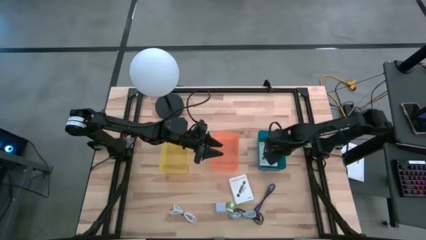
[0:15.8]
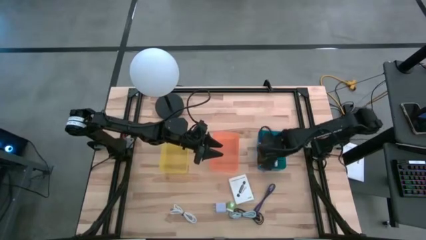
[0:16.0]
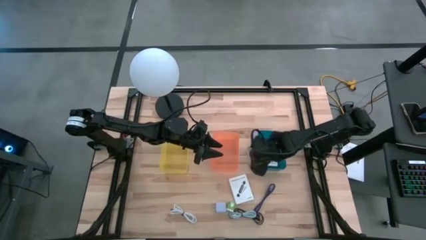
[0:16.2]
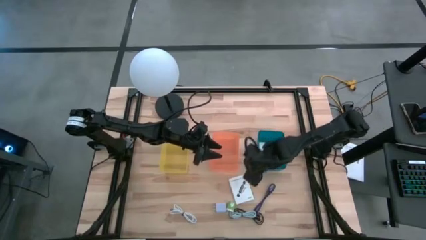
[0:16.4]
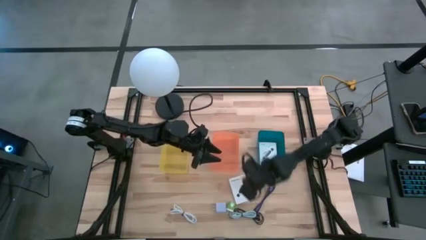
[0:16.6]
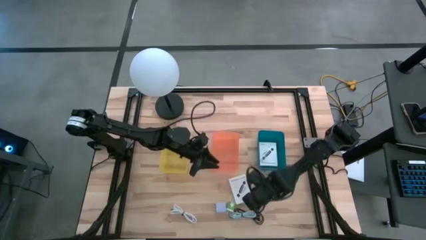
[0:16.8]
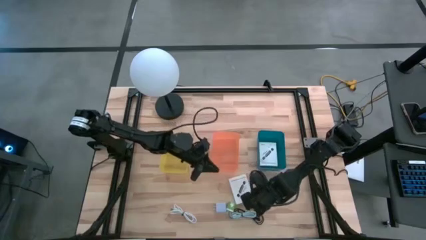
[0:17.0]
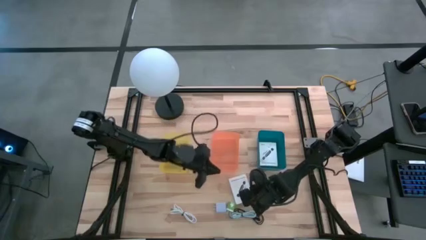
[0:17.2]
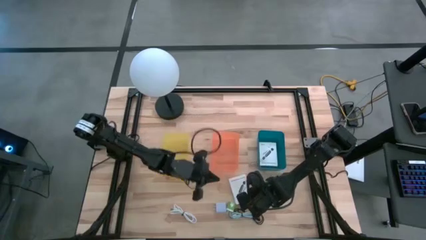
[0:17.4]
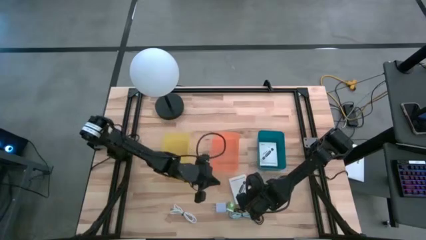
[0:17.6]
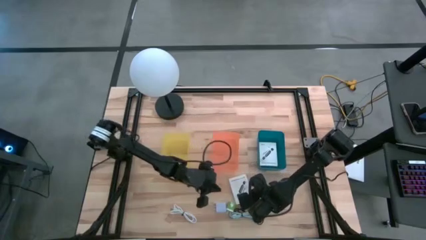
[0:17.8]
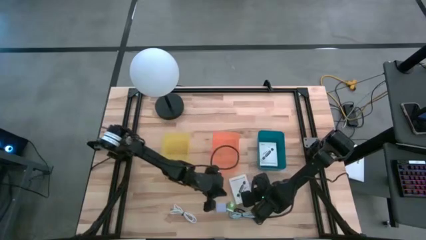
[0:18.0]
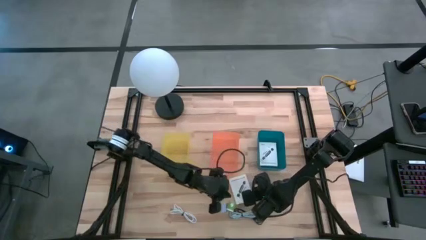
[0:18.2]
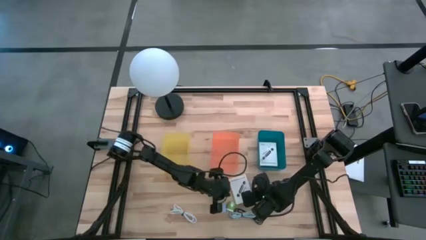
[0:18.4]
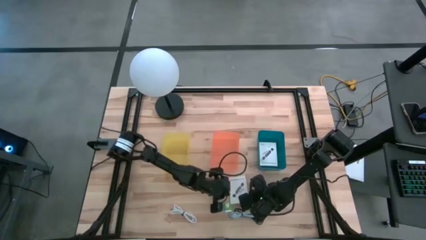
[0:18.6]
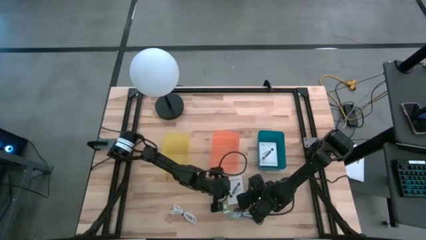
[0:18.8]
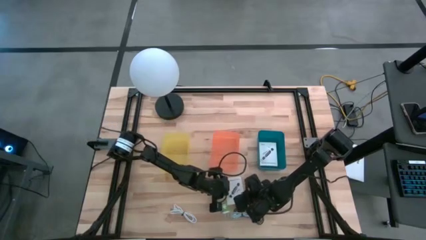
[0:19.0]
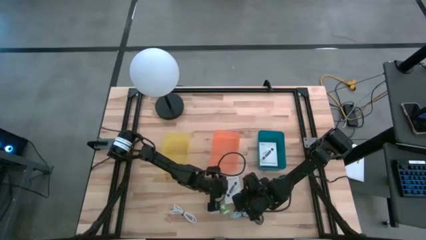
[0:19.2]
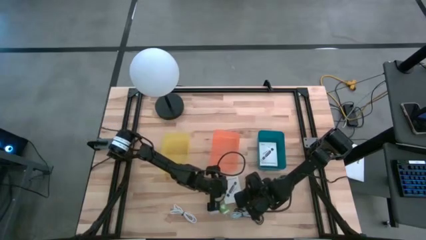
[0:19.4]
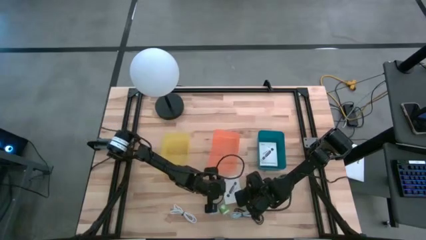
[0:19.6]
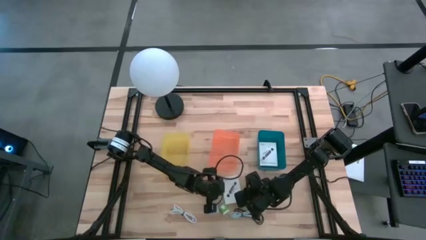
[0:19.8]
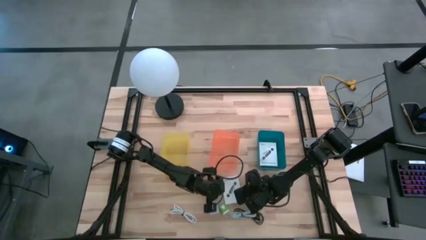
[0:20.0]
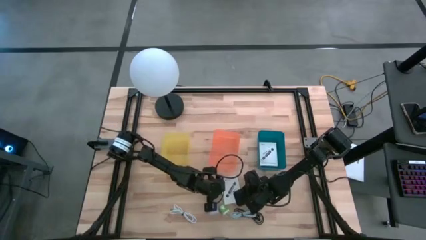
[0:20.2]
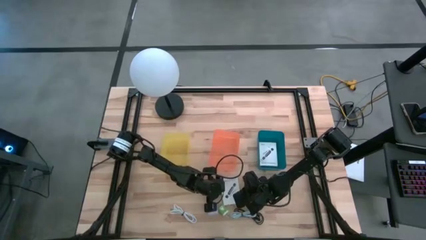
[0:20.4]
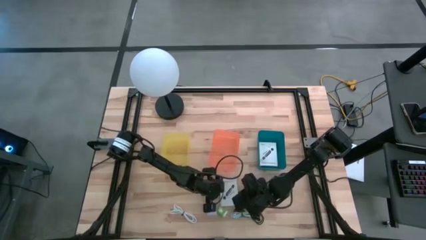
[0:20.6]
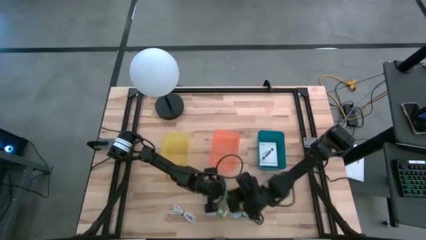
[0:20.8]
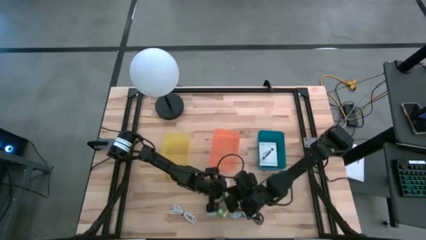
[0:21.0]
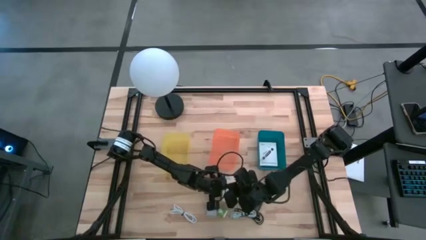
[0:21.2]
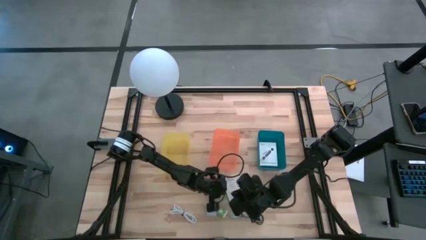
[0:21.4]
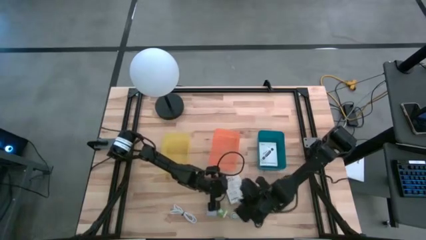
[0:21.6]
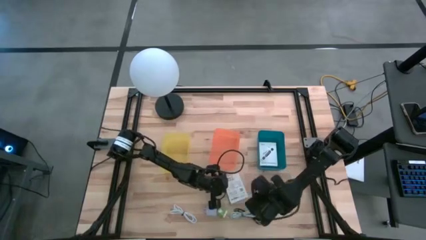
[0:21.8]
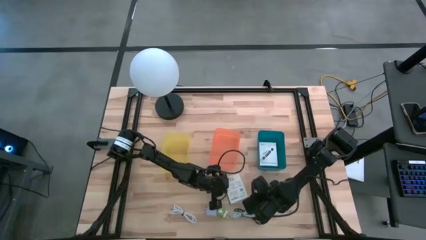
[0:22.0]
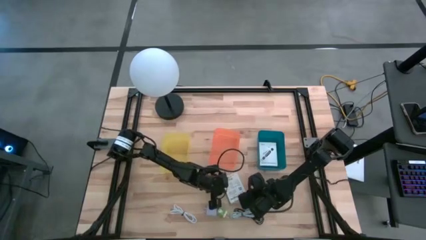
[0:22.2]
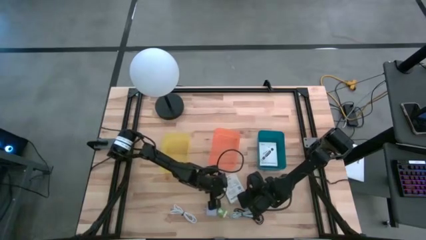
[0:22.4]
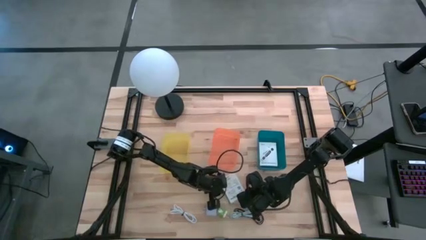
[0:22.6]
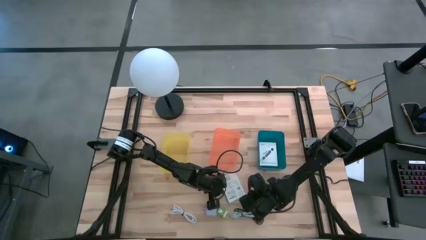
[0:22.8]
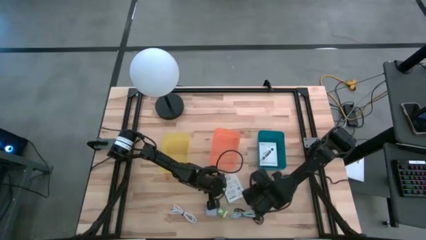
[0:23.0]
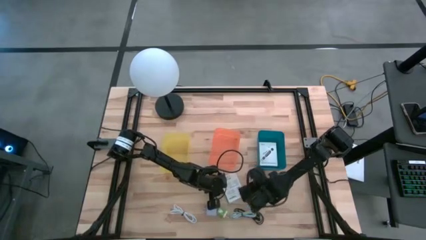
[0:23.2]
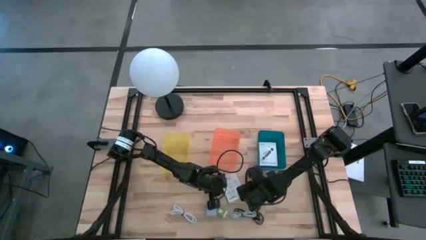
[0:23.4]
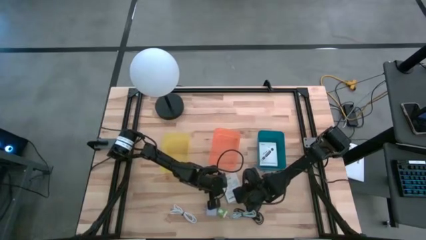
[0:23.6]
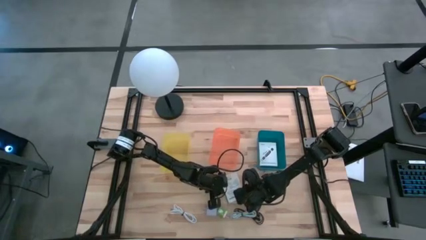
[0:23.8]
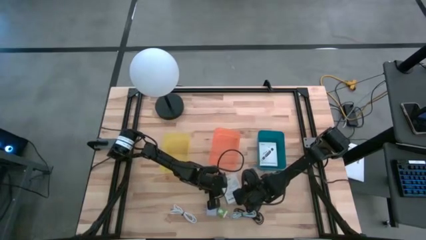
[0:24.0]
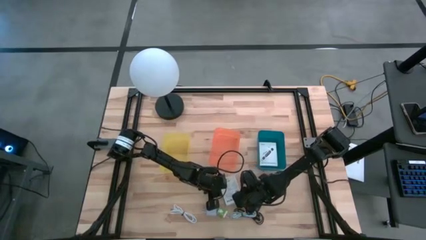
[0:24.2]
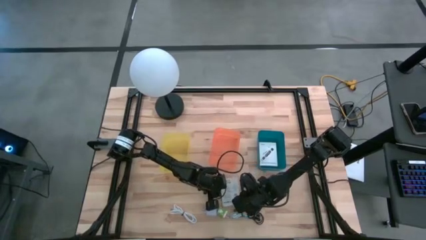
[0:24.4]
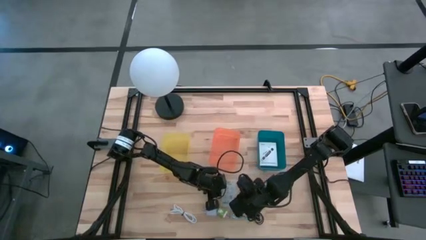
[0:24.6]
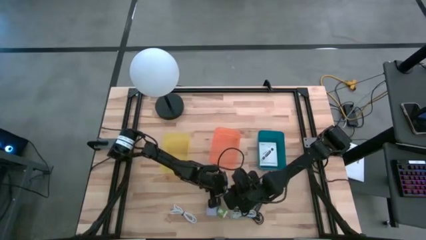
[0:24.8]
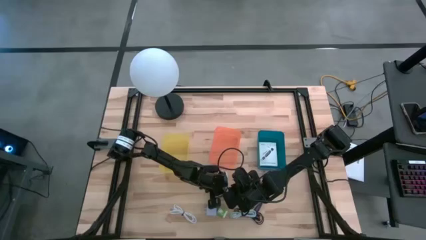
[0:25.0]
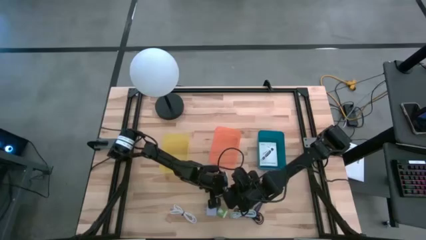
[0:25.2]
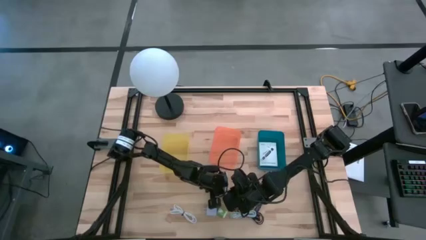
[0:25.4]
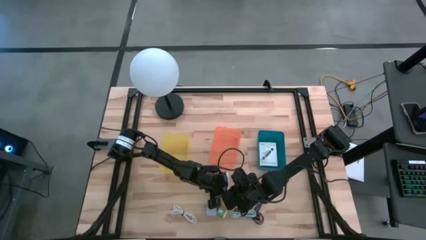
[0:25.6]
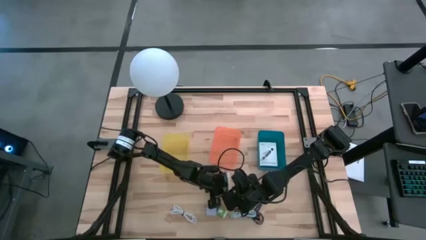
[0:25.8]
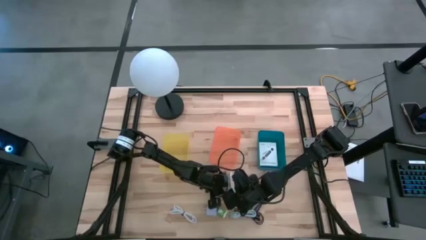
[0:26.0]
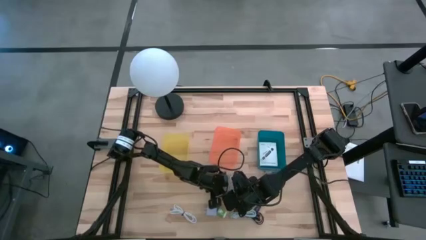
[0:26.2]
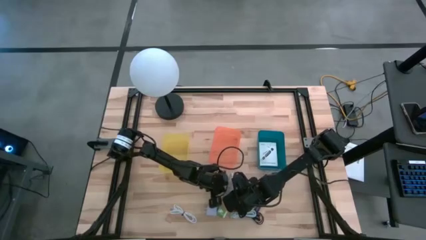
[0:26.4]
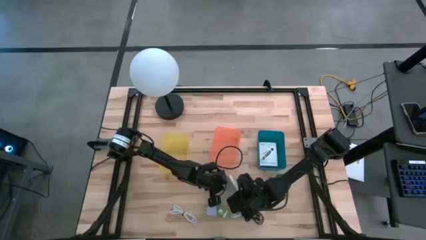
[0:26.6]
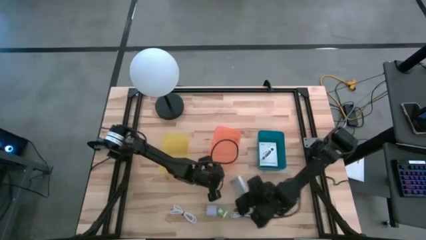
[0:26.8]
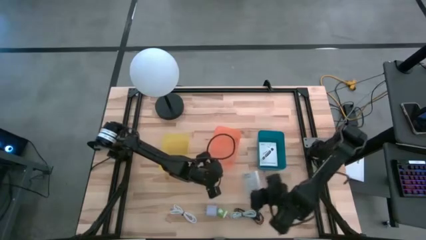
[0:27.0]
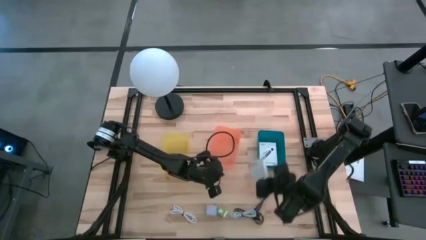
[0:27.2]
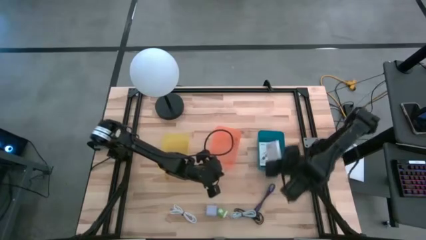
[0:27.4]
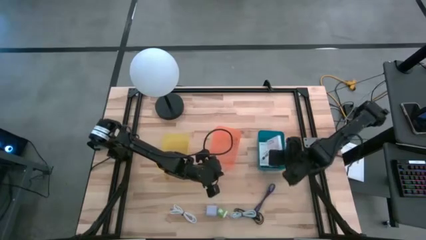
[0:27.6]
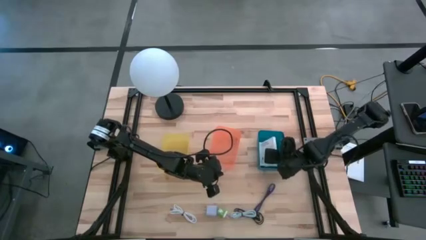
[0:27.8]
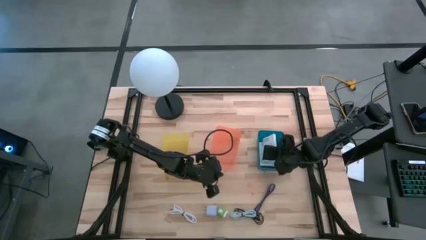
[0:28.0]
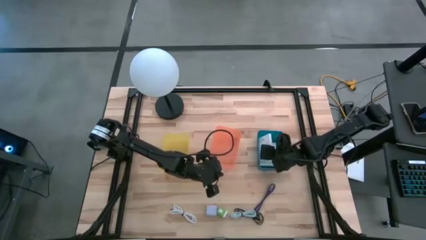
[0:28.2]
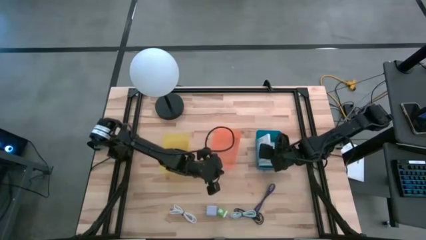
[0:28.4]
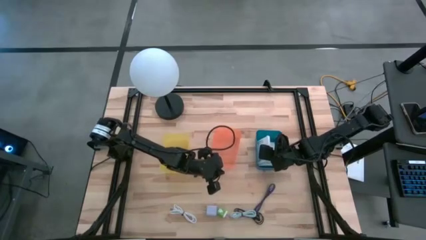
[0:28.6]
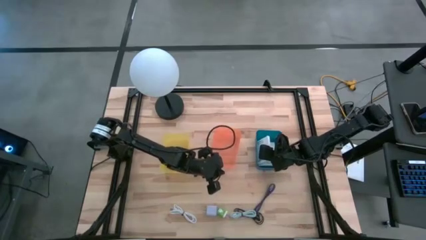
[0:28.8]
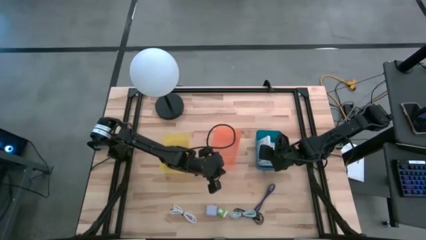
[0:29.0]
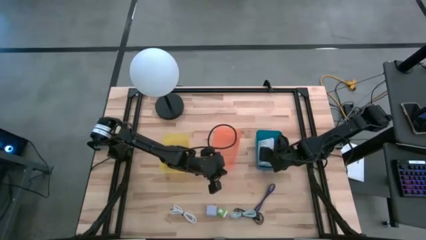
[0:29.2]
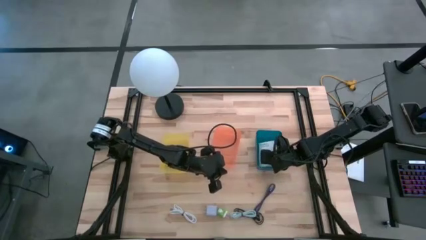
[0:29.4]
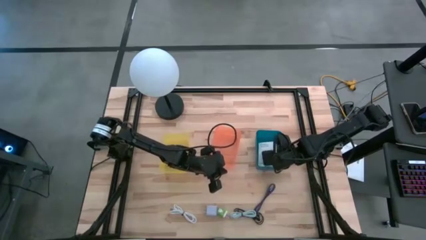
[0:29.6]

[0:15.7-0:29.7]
Task: Pick and place items into bin
Put the card reader box into the blue bin

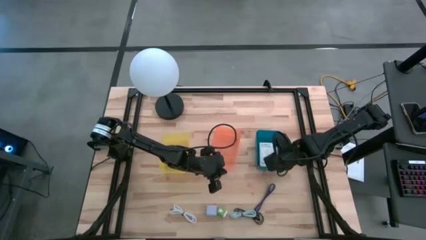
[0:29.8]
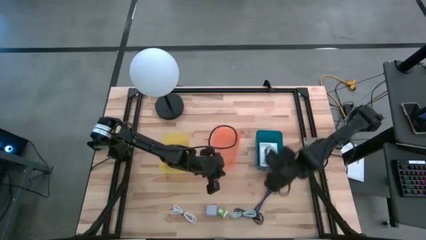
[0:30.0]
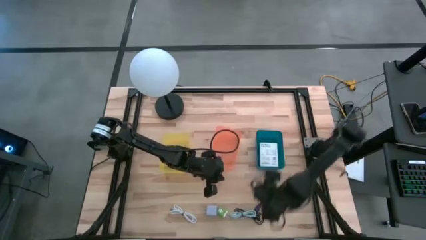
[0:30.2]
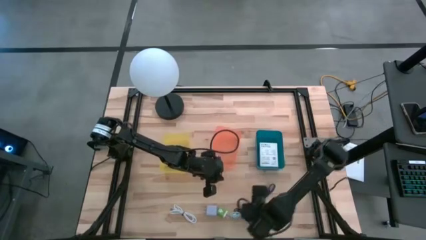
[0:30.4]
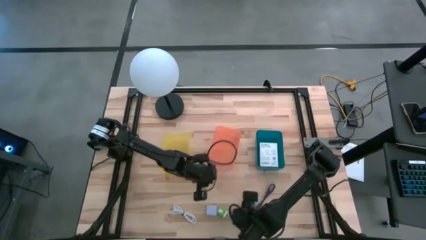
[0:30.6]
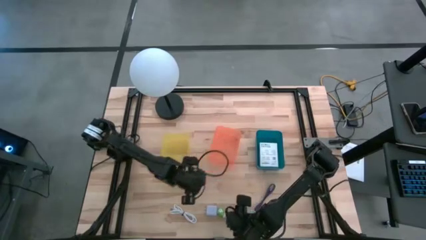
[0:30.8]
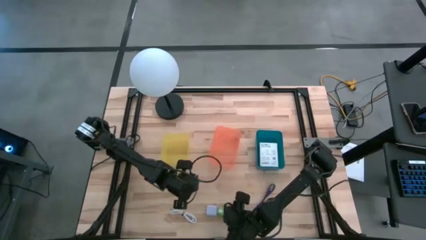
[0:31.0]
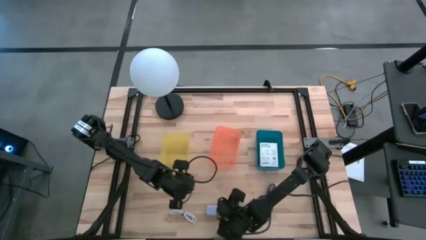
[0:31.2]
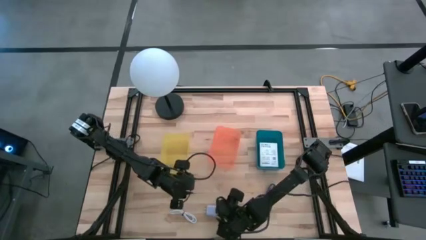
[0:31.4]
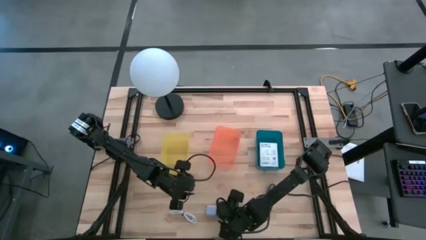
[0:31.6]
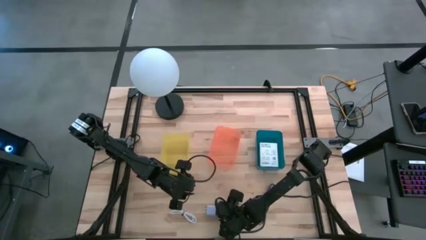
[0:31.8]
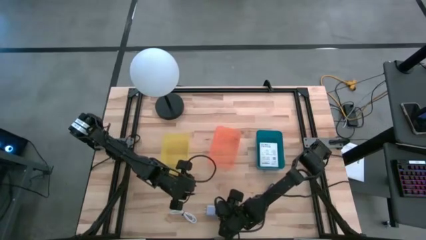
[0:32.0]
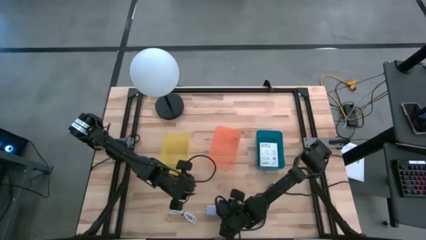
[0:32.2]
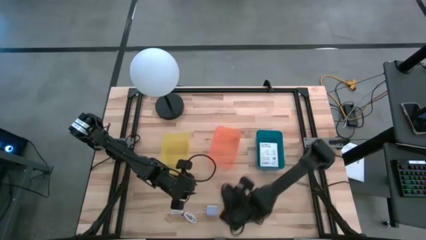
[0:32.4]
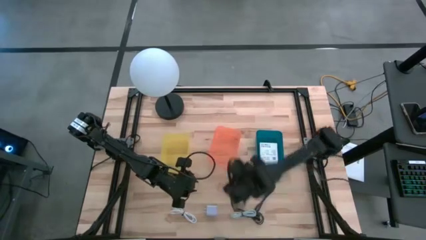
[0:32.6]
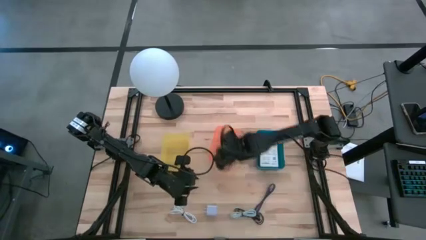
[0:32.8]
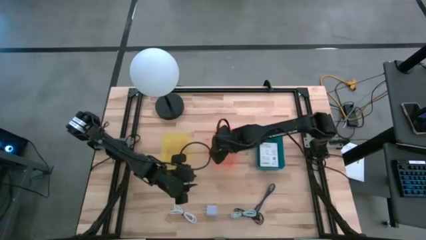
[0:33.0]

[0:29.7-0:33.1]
Put the green charger adapter into the orange bin
